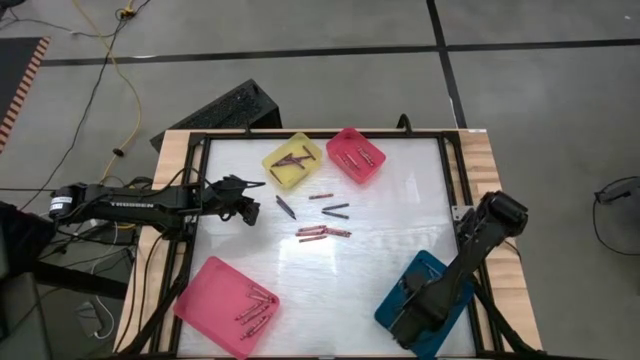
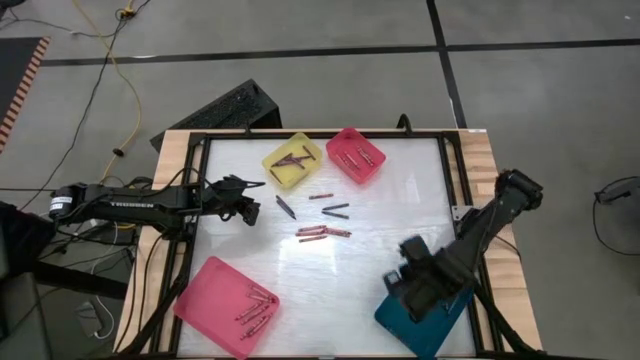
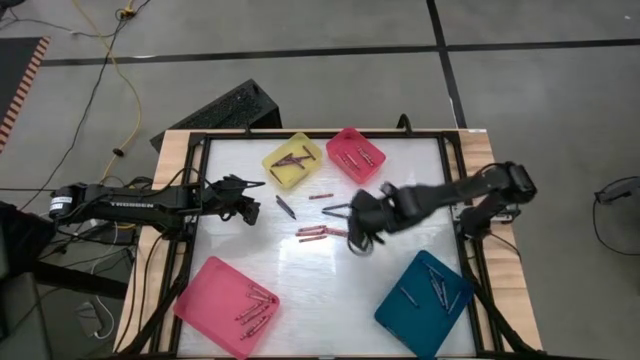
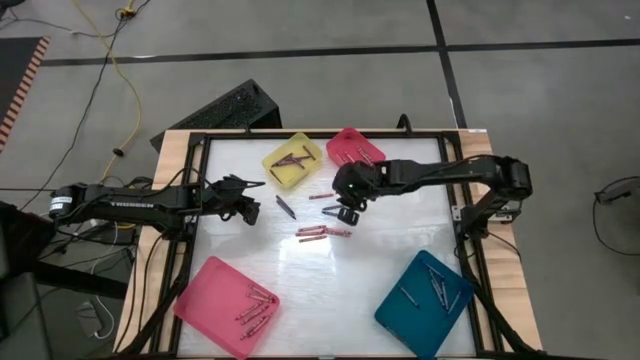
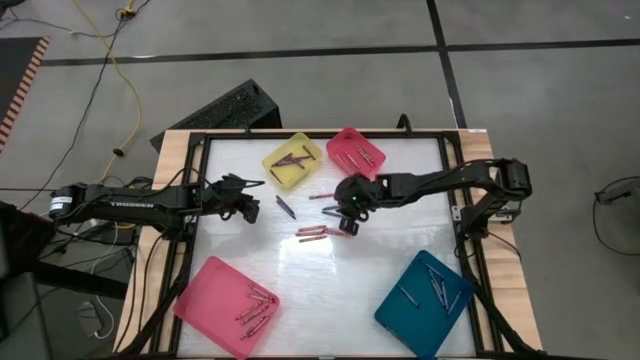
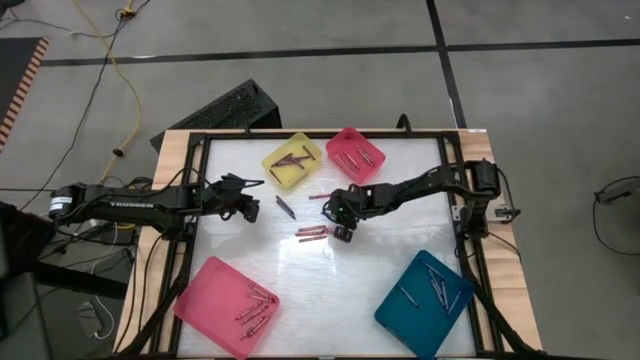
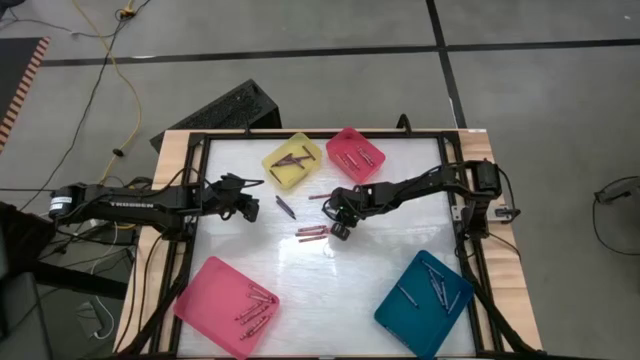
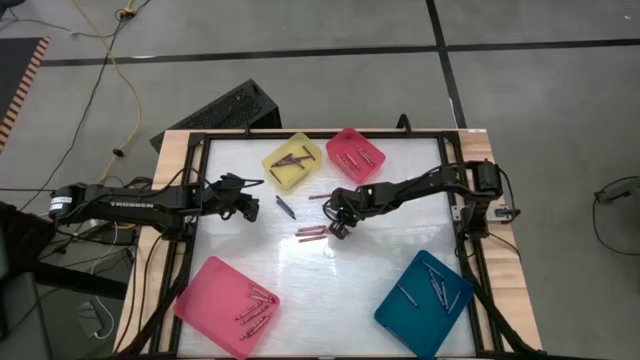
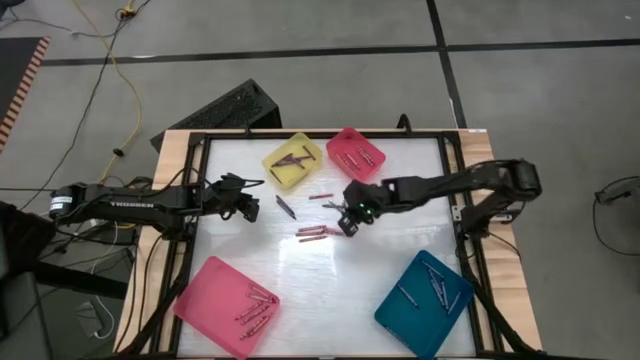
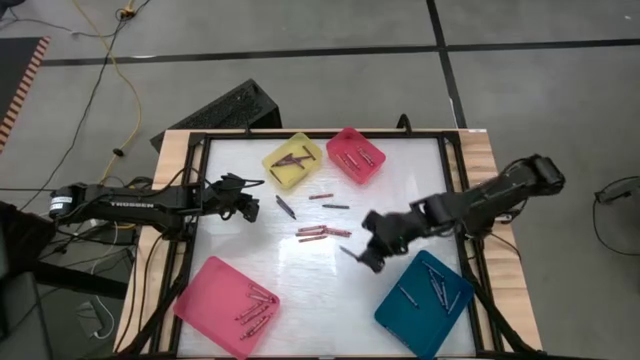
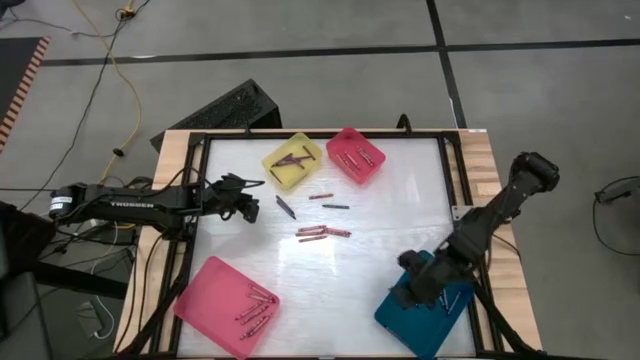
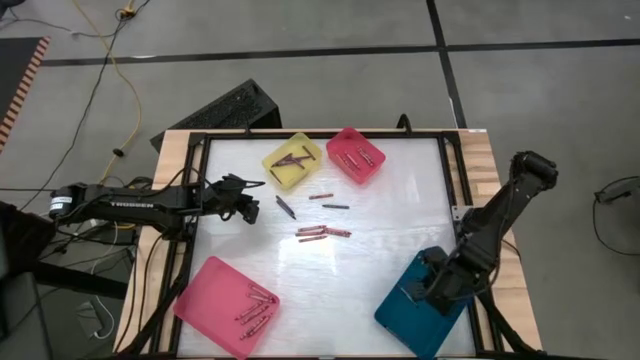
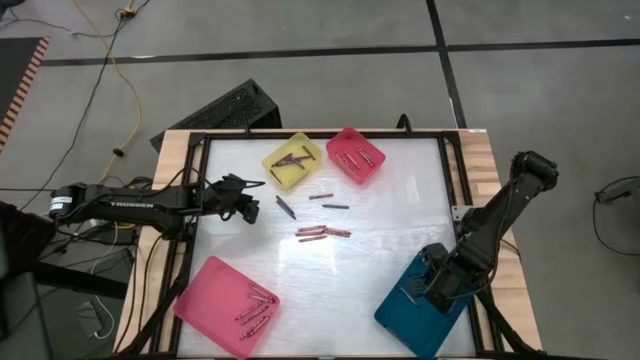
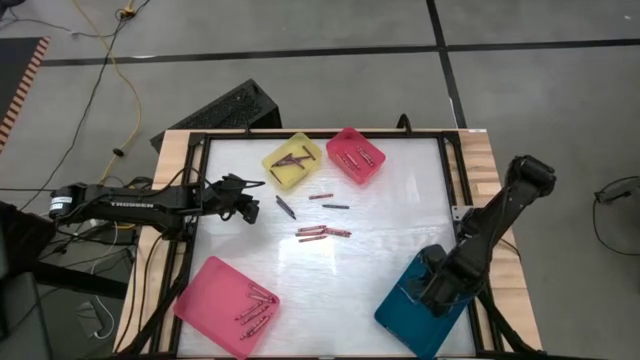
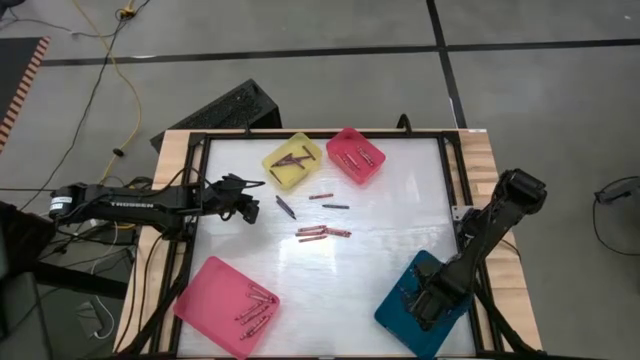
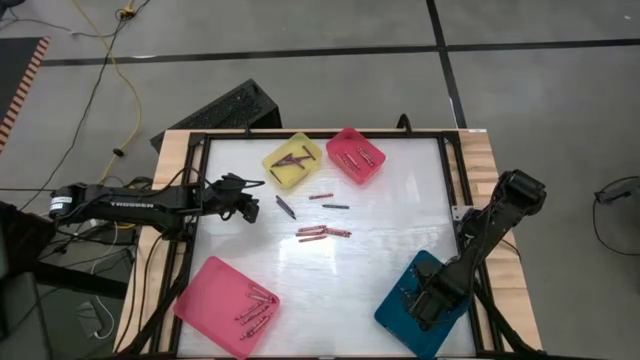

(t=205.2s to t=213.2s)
Task: Sort crayons
Put the blue crayon into the blue bin

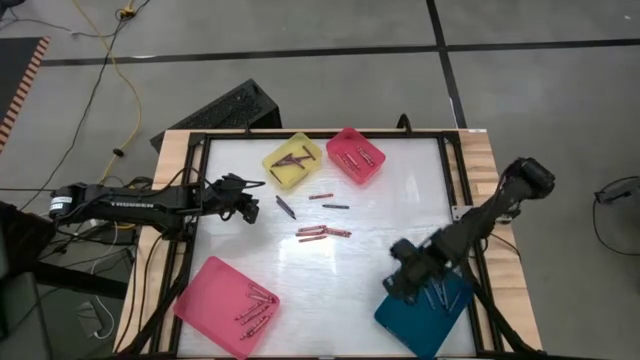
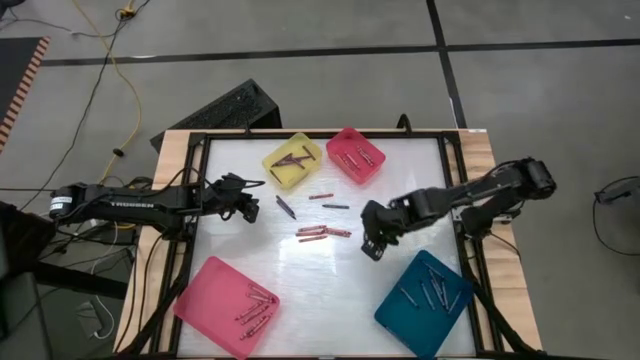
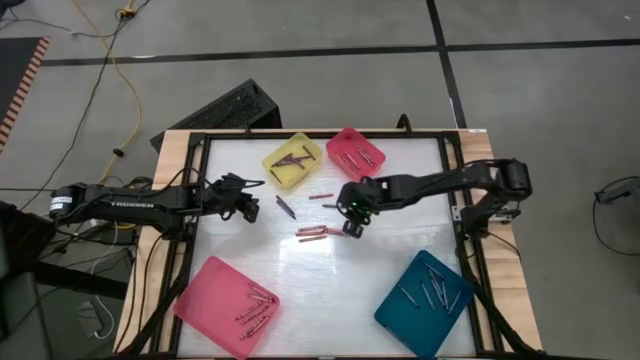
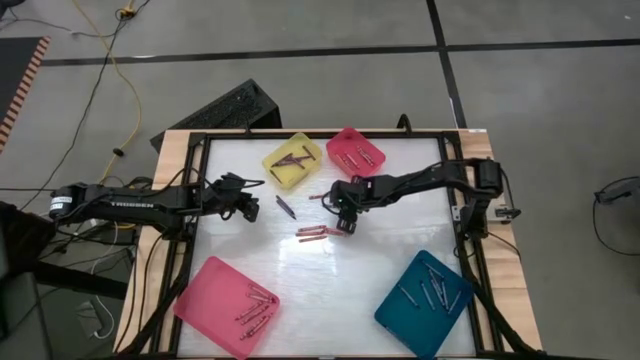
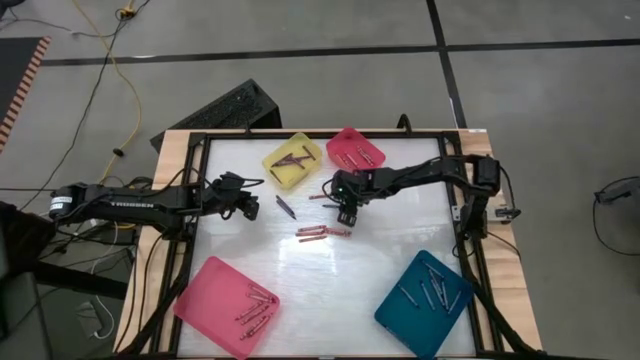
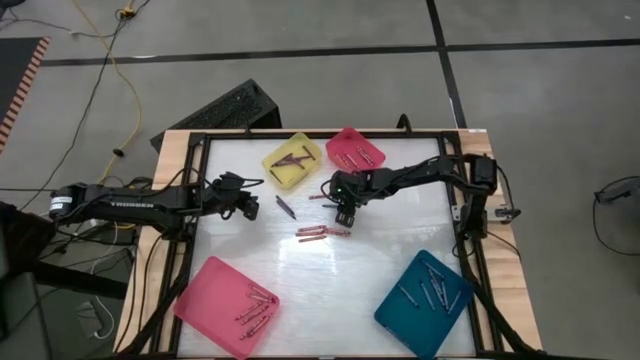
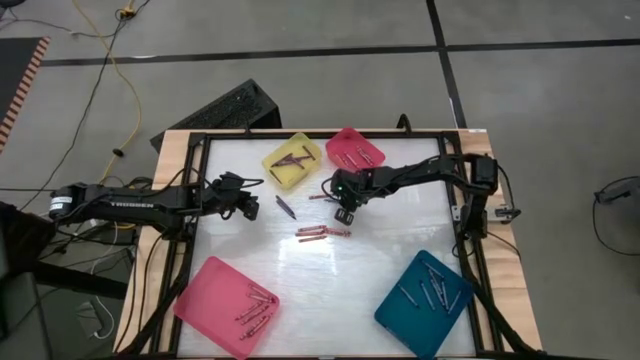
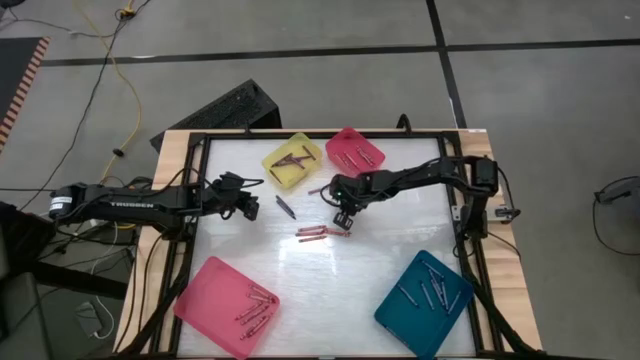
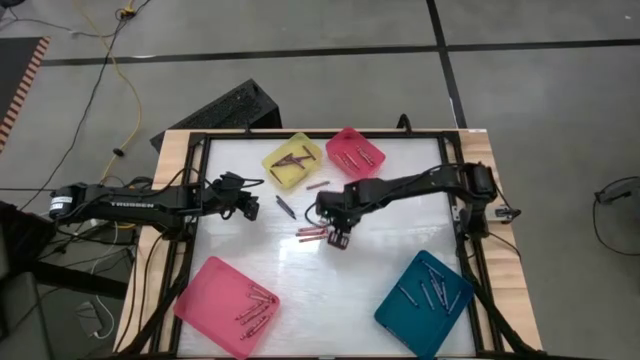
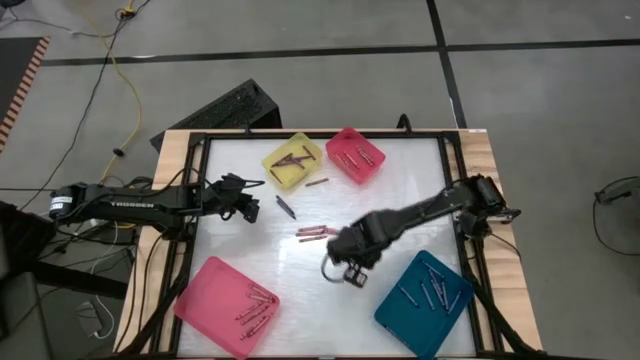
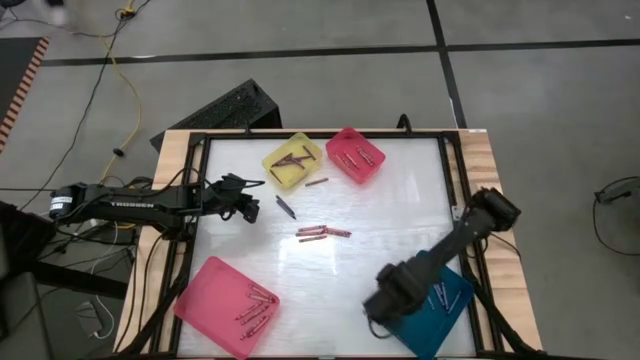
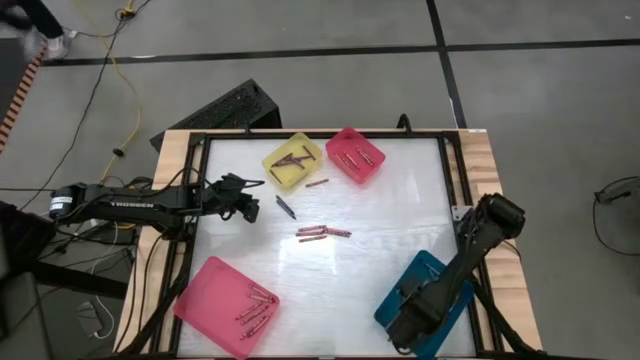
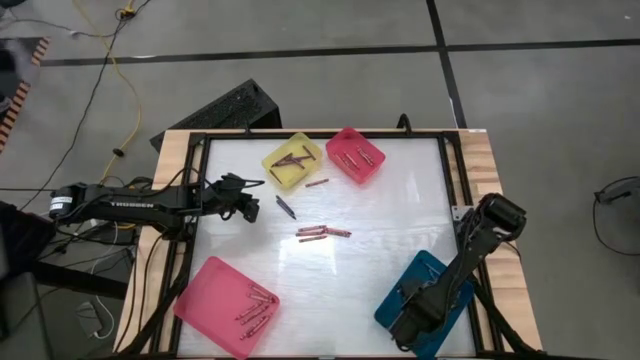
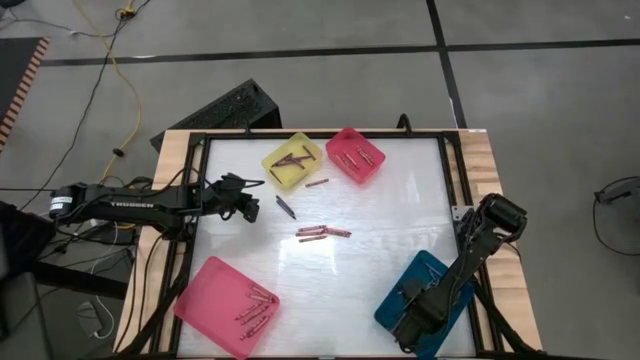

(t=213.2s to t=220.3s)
Put the blue crayon into the blue bin

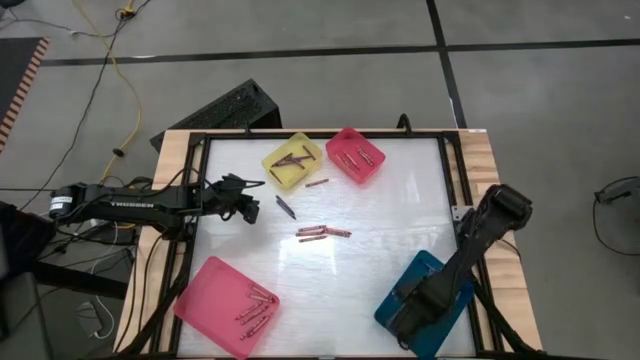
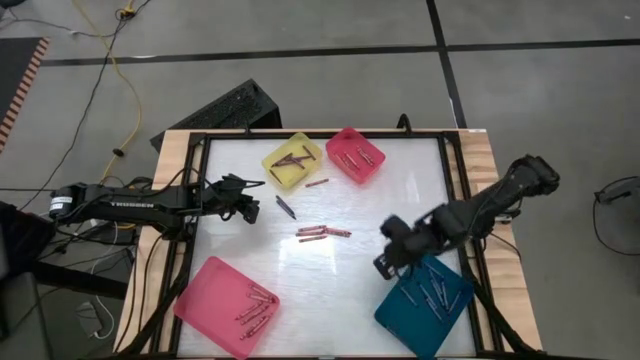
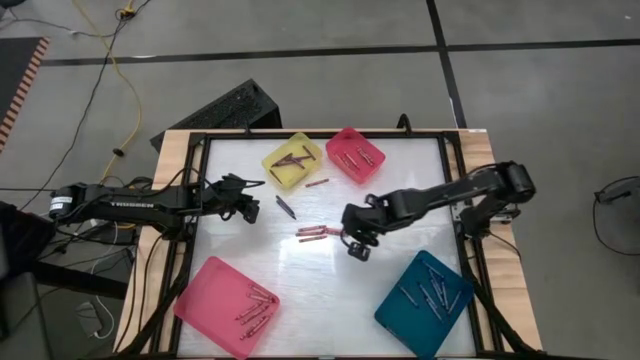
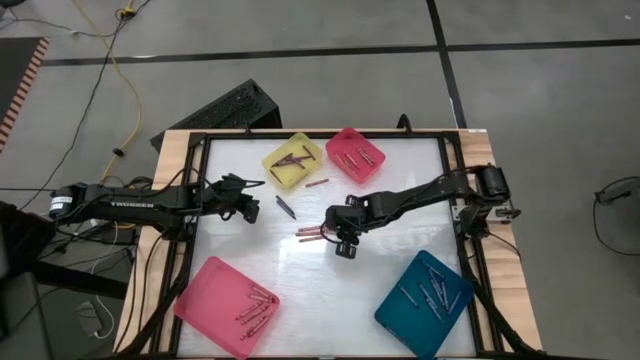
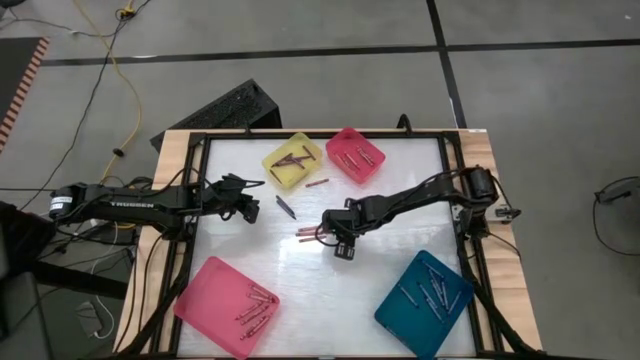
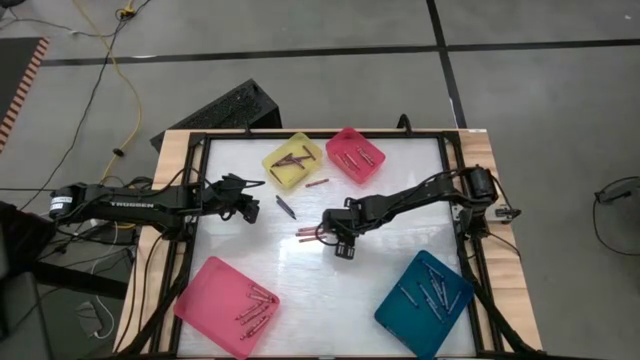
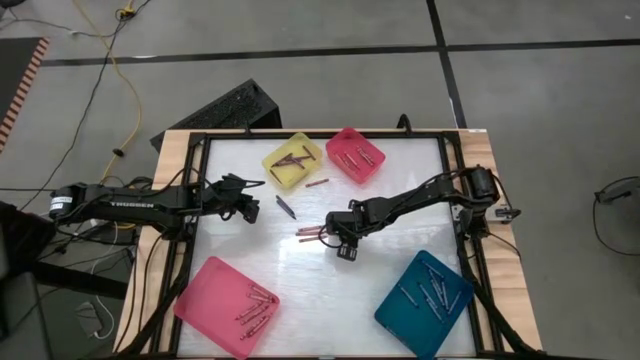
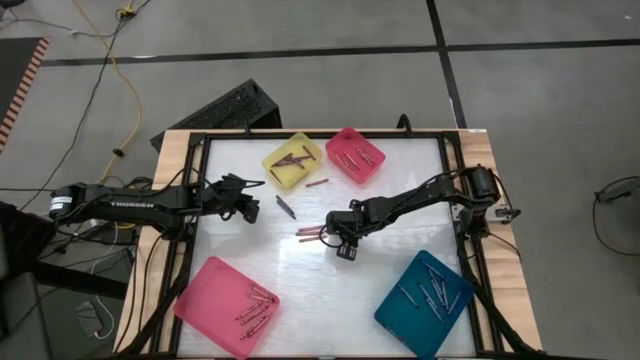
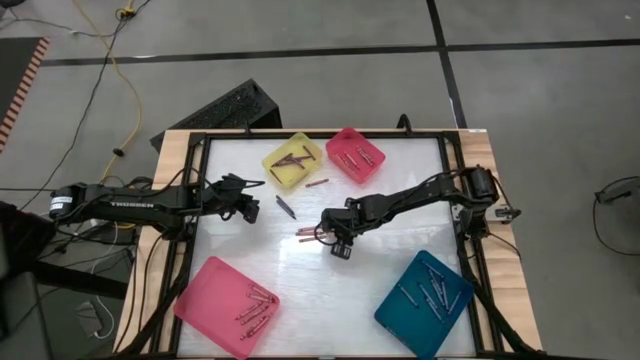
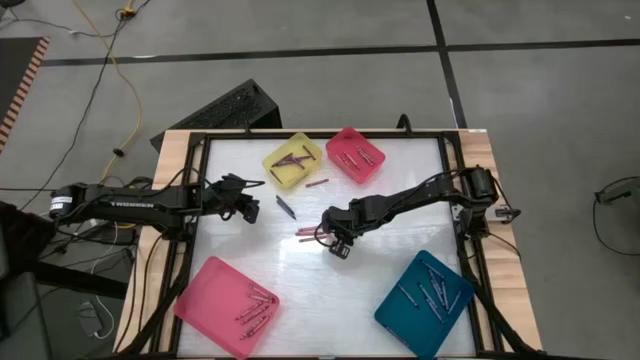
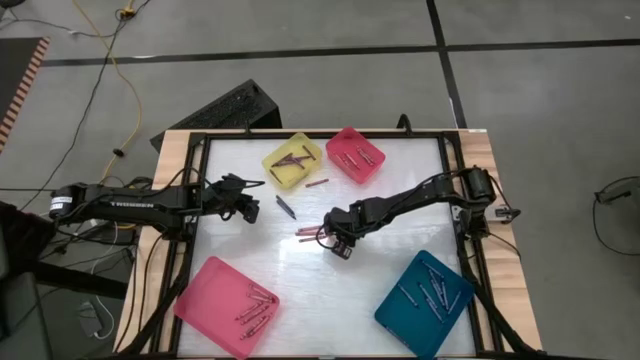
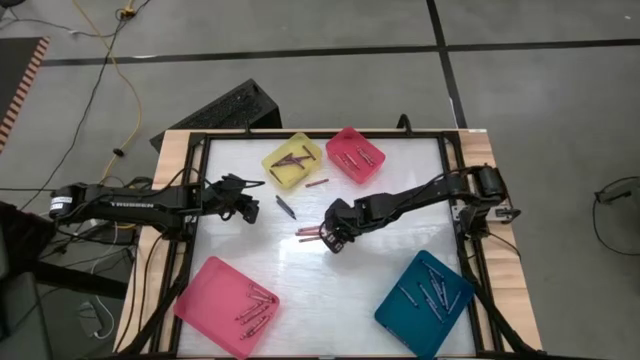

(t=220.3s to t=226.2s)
Put the red crayon into the pink bin

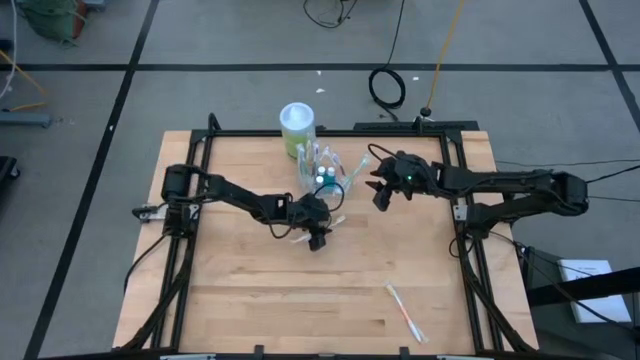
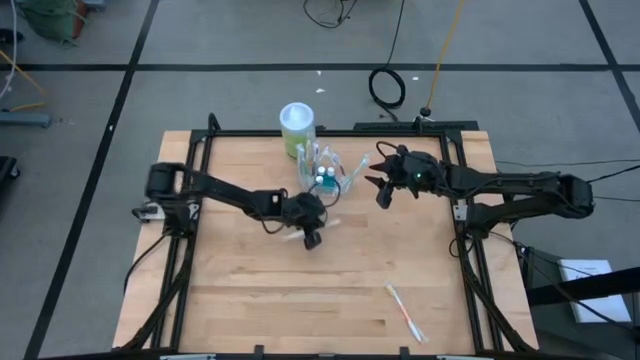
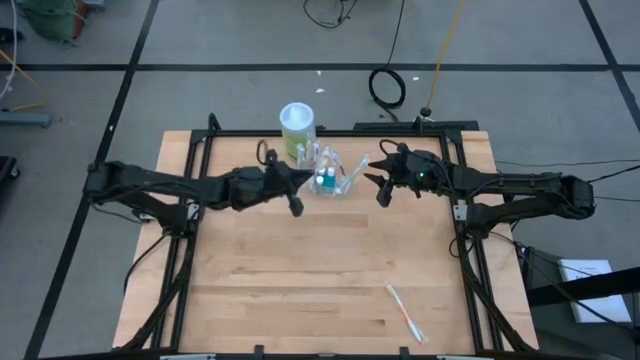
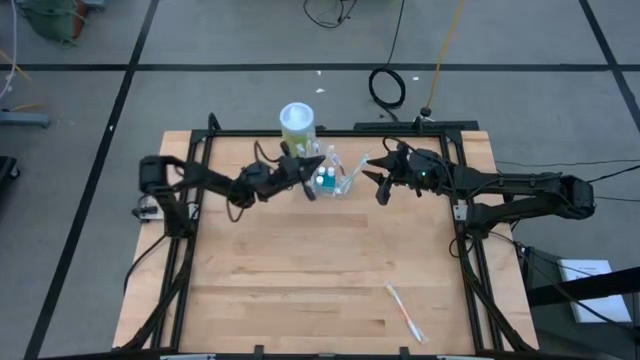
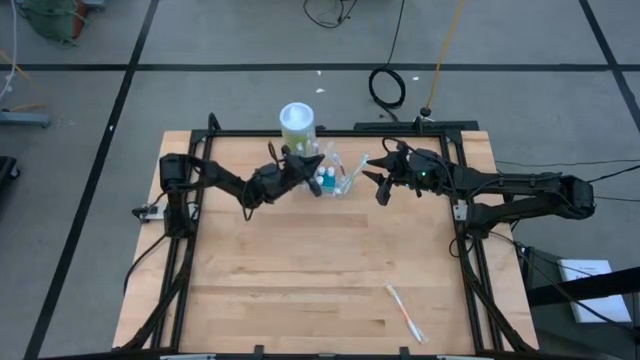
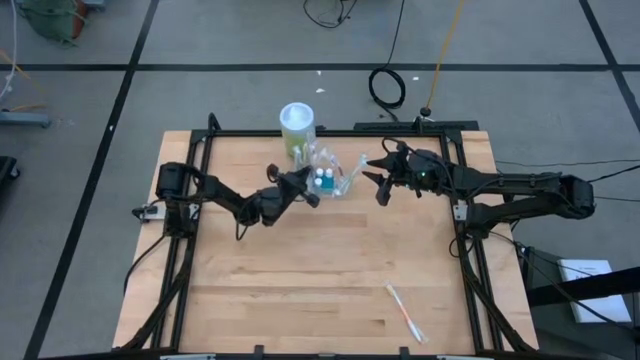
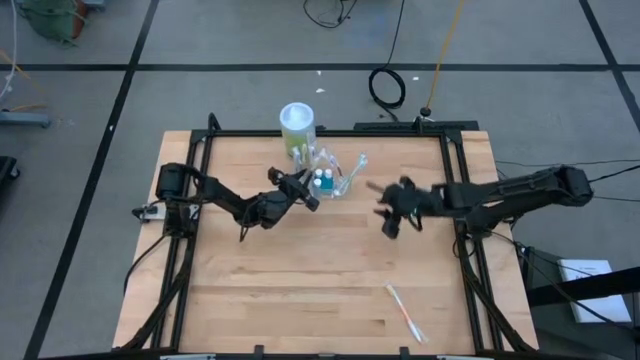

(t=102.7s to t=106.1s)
Task: Pick & Place toothbrushing station
Put the orange toothbrush into the left of the transparent organizer
